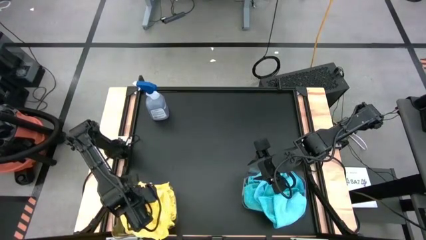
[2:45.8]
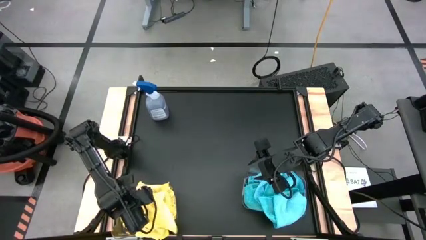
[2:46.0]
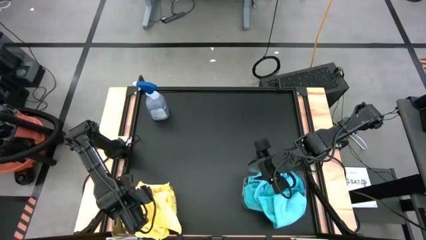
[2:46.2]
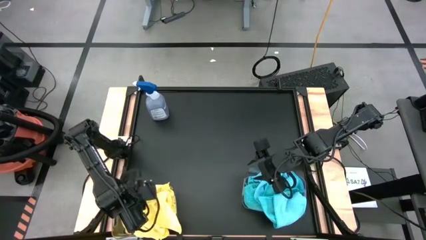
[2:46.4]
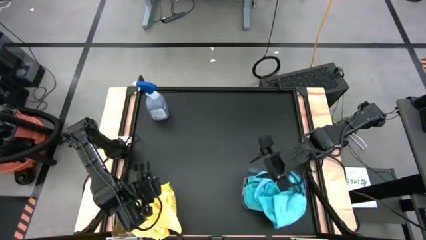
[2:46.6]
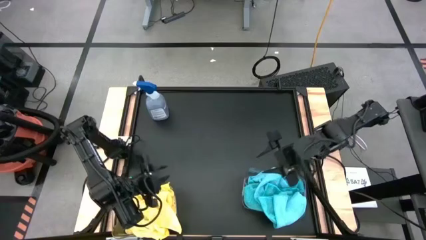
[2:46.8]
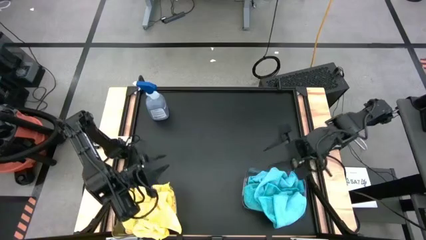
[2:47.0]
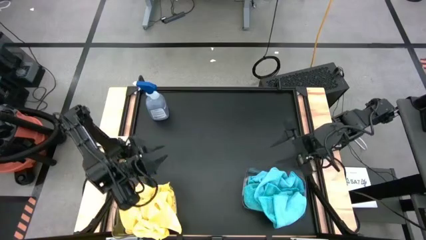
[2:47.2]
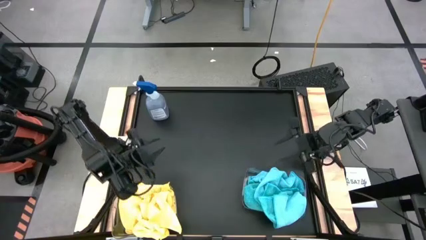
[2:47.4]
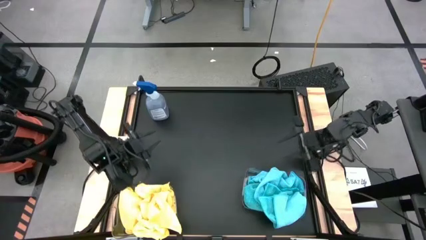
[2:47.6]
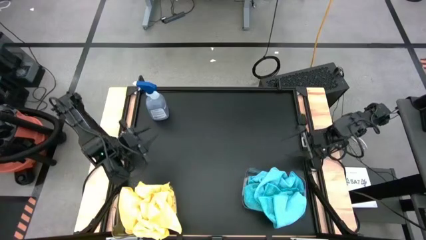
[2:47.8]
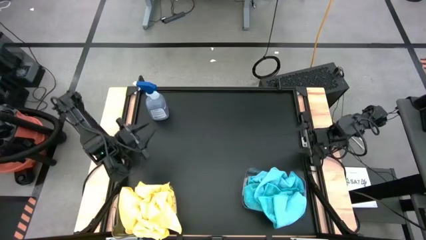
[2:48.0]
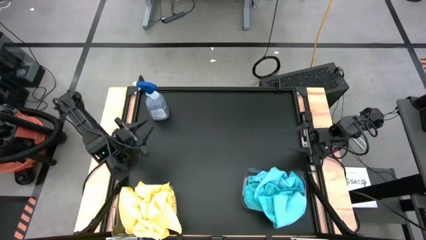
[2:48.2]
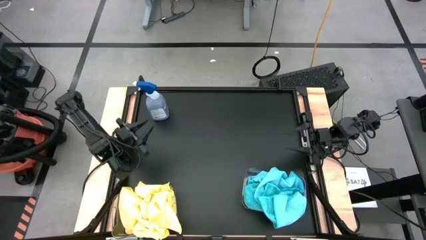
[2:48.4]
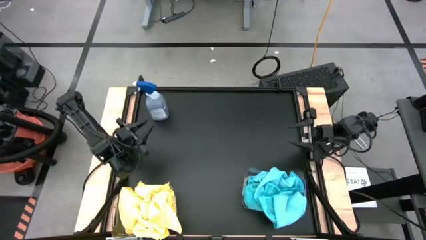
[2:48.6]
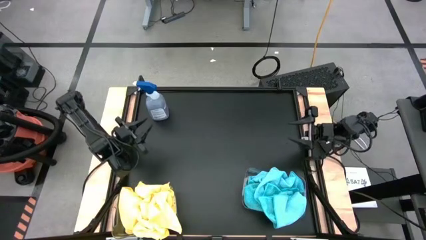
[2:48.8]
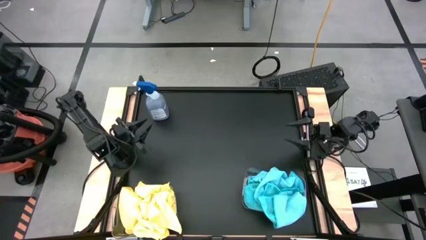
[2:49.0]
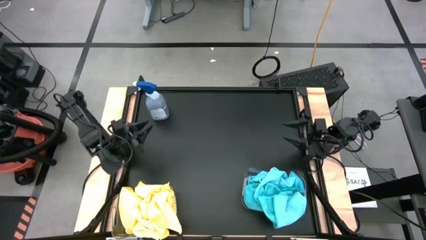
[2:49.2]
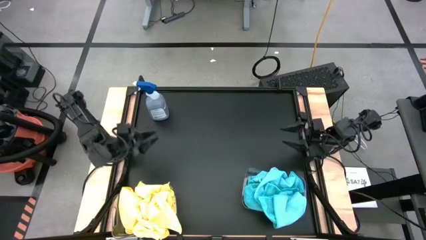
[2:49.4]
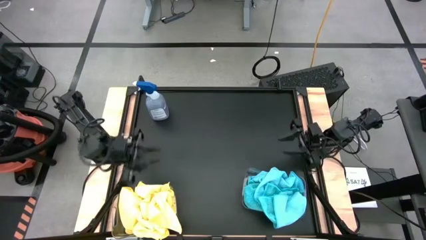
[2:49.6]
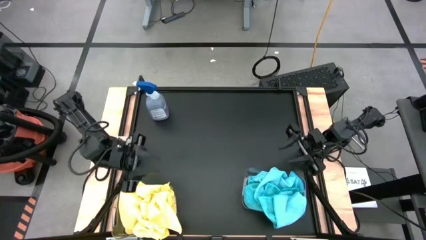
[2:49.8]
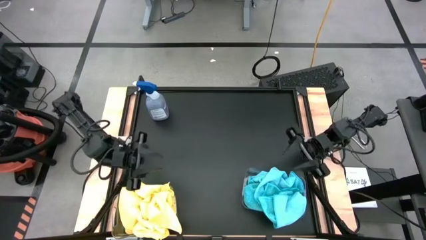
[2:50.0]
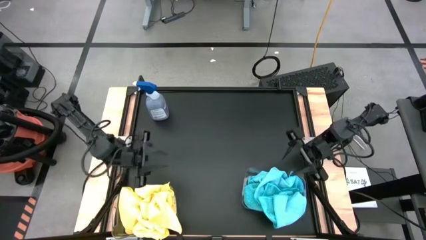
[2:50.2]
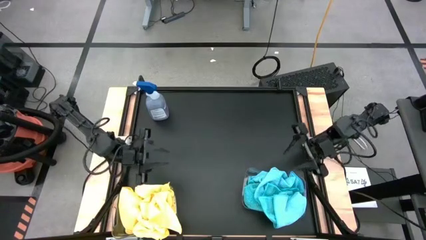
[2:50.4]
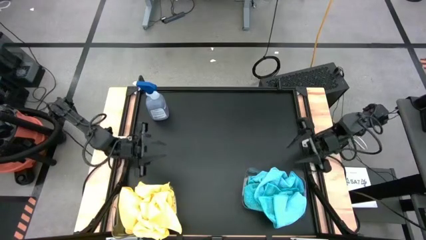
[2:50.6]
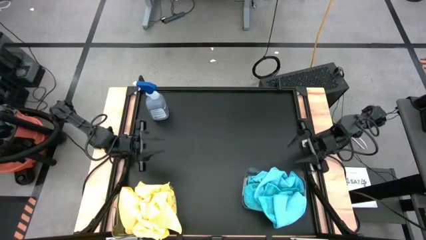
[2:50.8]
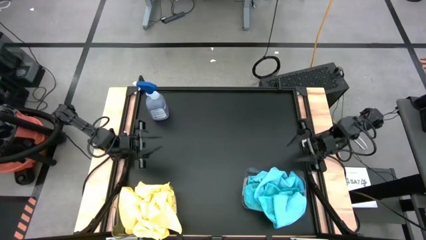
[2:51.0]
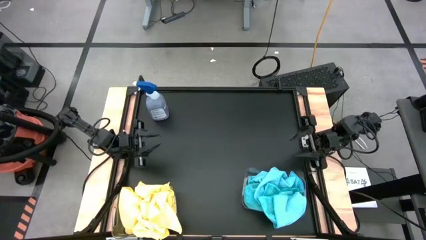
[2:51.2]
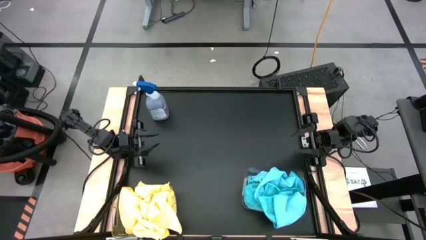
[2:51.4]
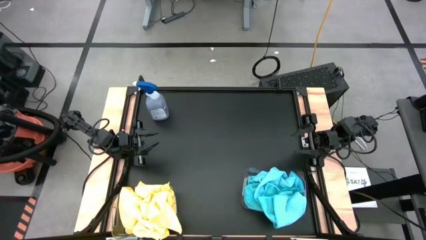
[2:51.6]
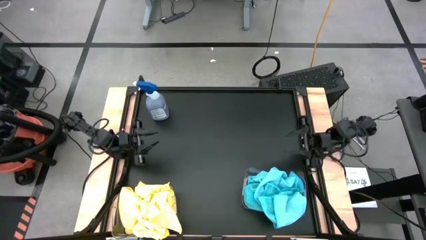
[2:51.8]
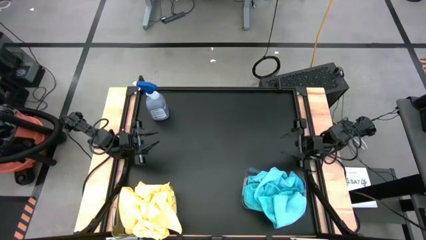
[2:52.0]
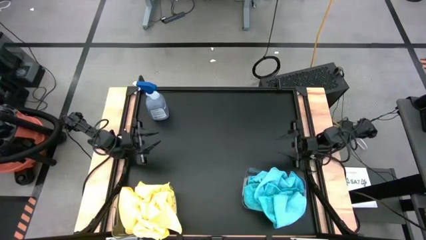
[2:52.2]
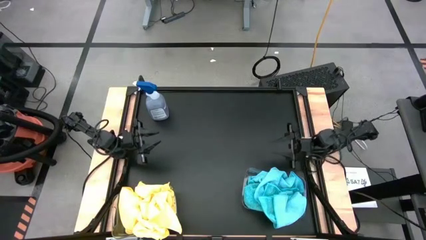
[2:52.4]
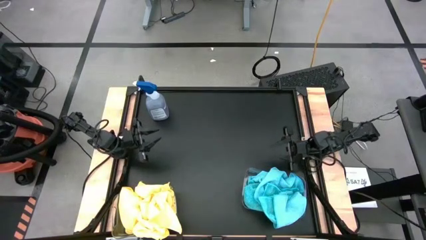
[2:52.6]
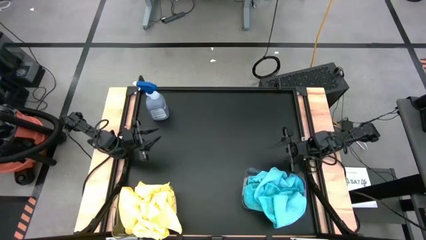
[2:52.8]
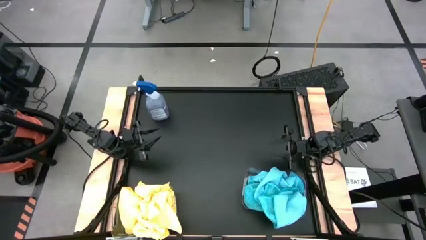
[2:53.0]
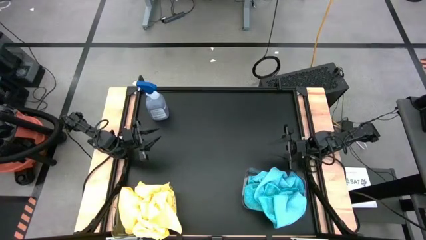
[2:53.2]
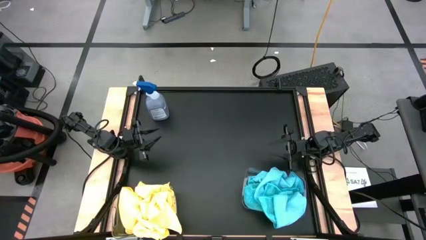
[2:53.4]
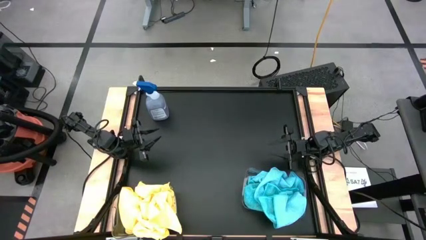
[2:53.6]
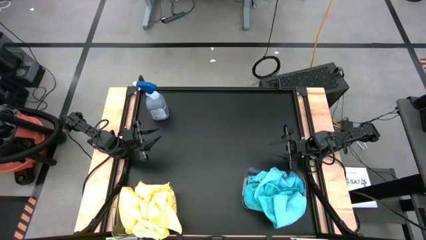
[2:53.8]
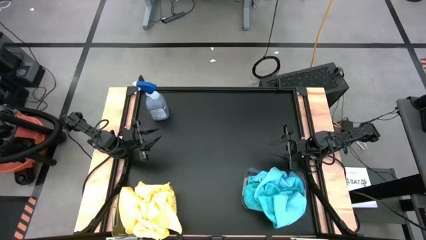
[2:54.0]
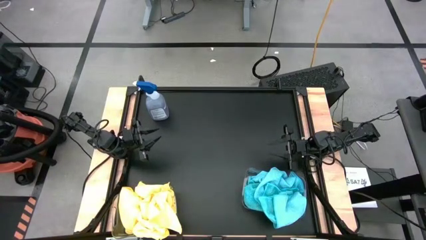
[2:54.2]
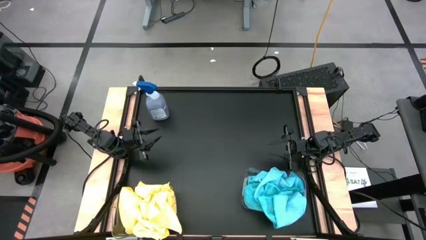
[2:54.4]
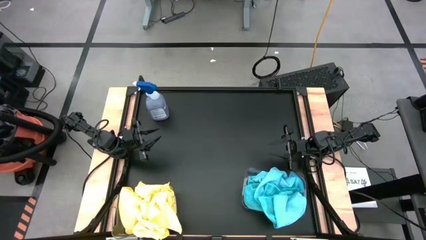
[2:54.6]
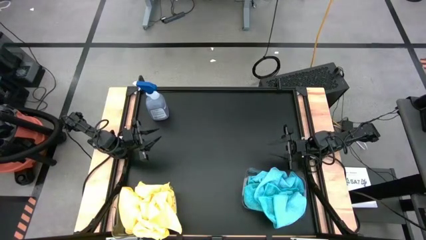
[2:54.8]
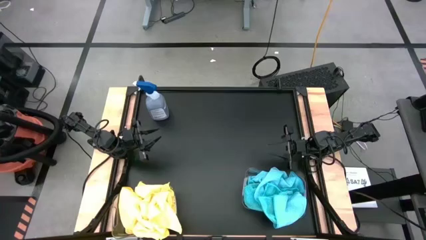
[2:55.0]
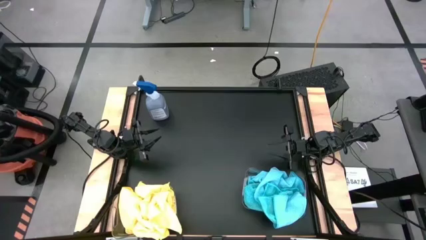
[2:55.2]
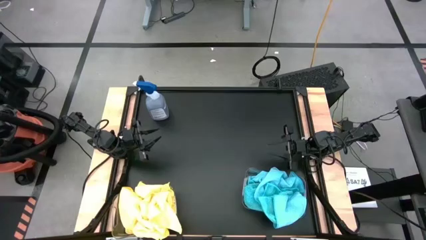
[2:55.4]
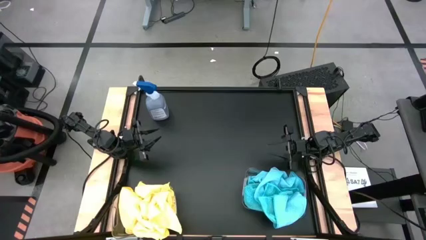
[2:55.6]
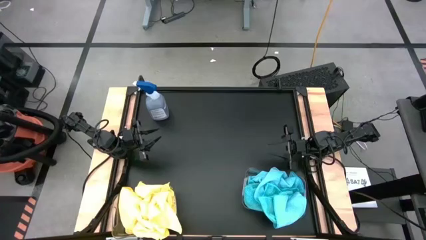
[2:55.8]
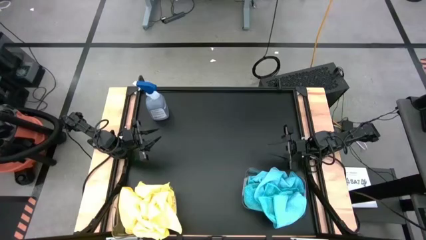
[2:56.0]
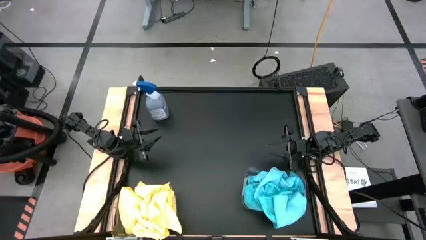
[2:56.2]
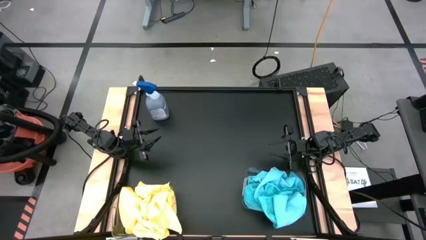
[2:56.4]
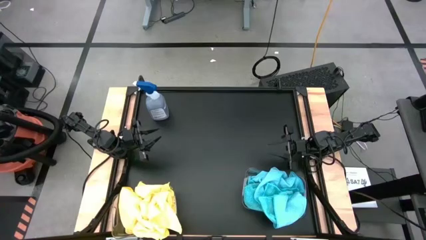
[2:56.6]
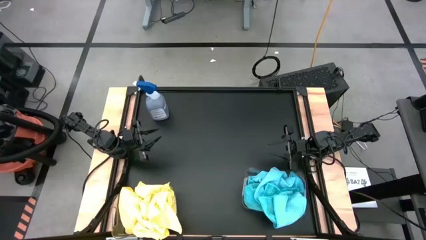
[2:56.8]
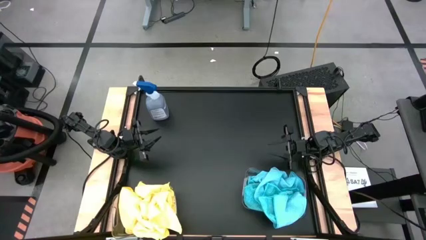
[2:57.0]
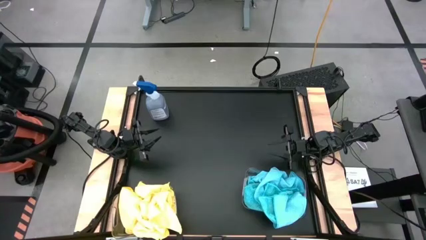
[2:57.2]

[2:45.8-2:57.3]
Task: Sort microfiber towel by color & place in baskets
Return to Home Position
